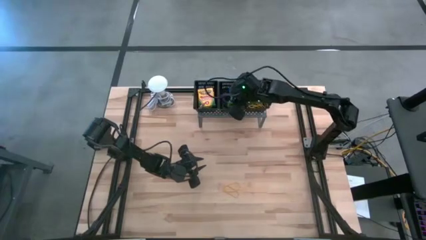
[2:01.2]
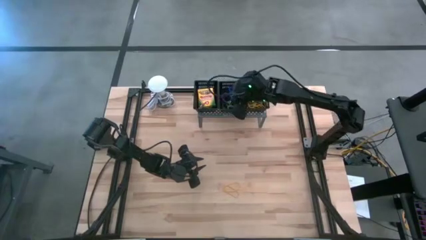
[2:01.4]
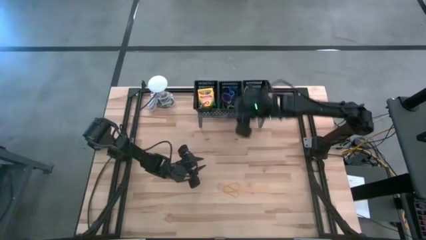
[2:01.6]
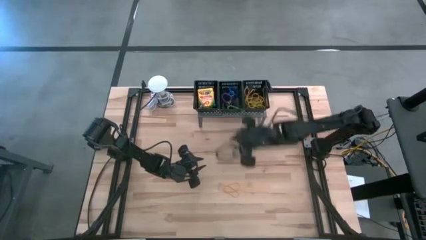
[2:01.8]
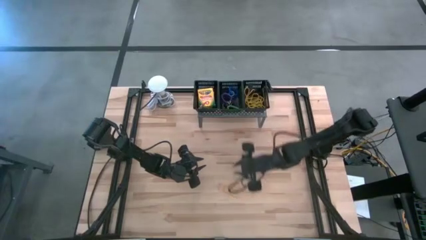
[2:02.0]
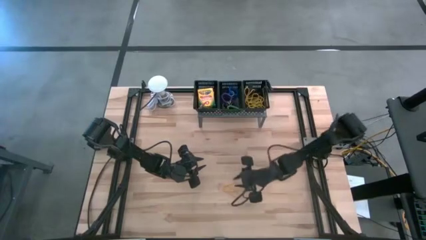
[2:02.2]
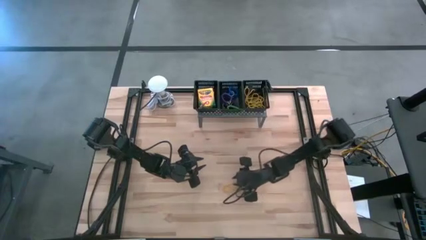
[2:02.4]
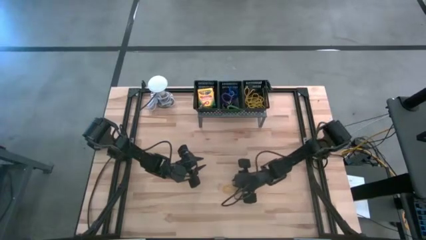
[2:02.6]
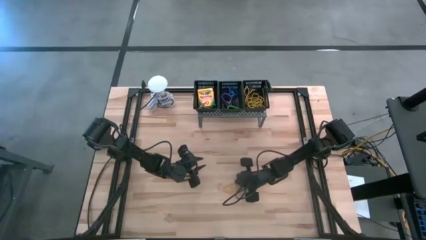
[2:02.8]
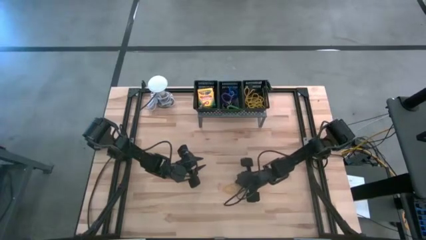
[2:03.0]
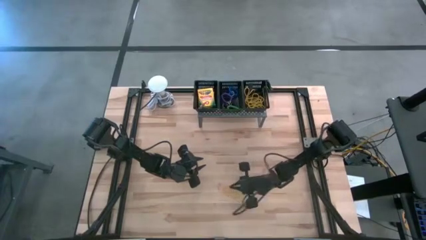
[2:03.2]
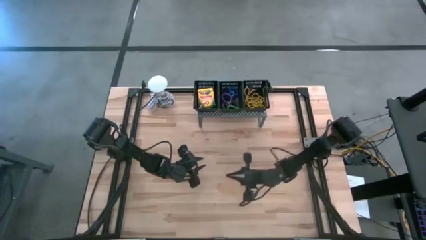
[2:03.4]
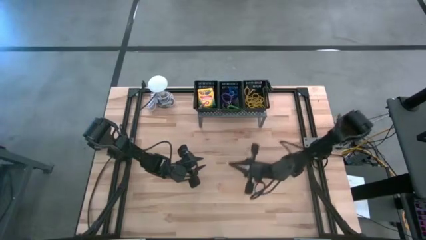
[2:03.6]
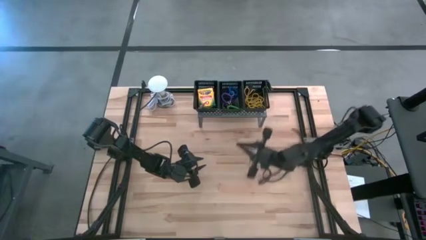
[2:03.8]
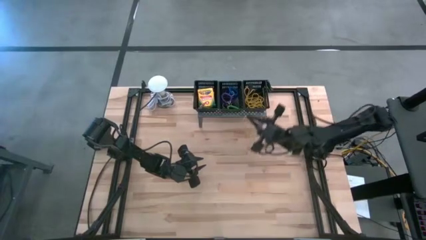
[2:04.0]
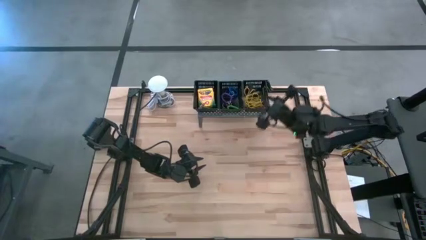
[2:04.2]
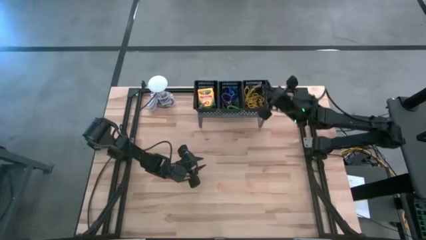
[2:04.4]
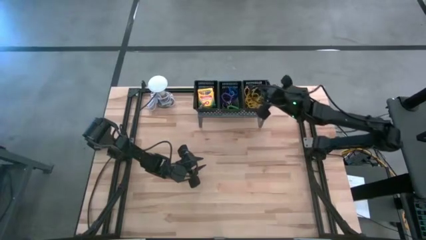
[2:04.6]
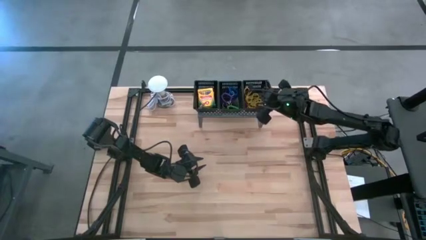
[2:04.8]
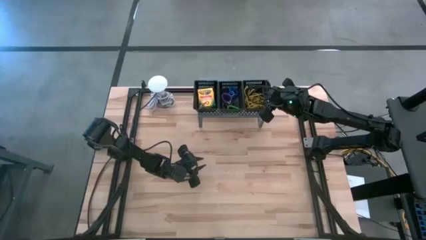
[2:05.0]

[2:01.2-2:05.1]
Task: Pick & Place Office Desk Supplies
Put the yellow rubber band into the right black bin on the shelf

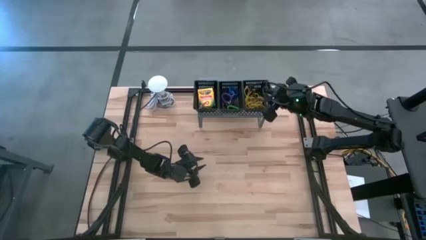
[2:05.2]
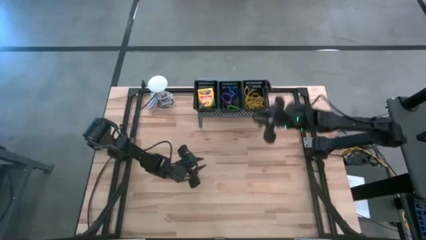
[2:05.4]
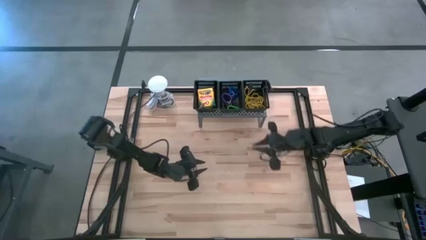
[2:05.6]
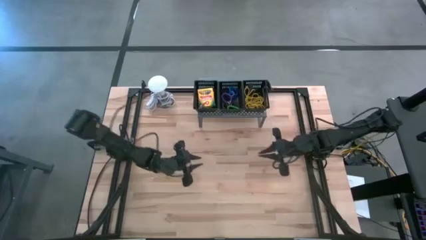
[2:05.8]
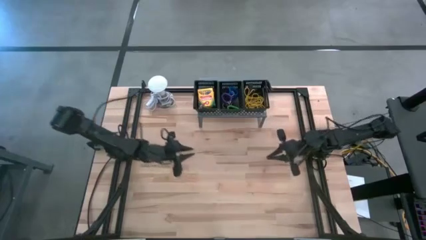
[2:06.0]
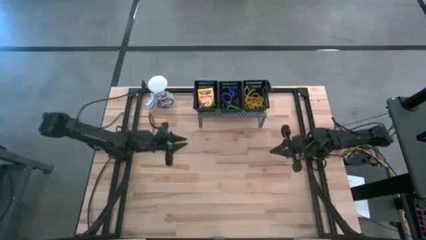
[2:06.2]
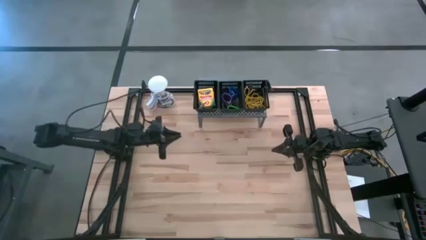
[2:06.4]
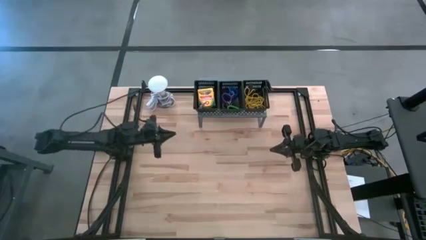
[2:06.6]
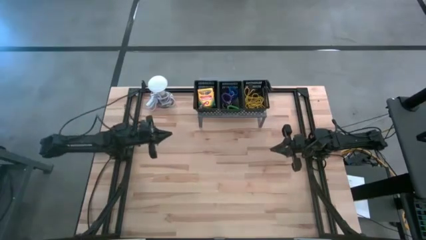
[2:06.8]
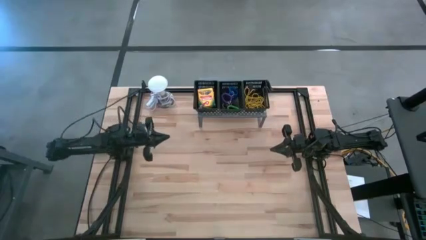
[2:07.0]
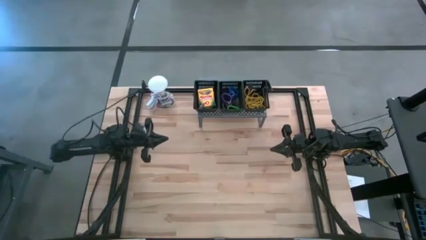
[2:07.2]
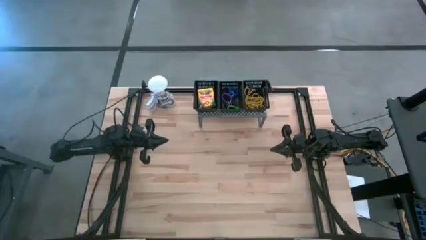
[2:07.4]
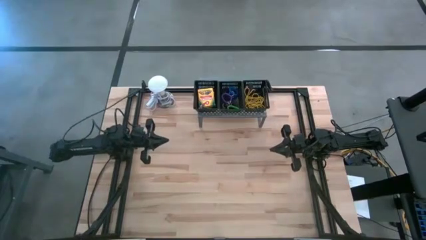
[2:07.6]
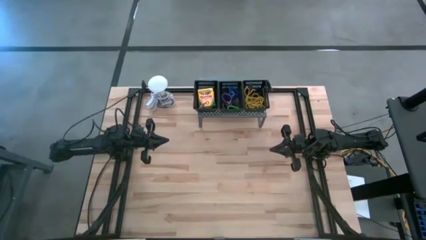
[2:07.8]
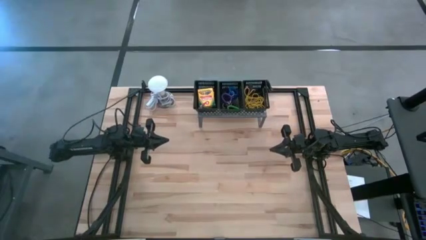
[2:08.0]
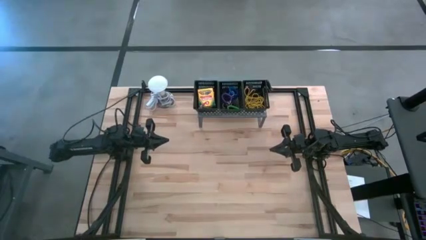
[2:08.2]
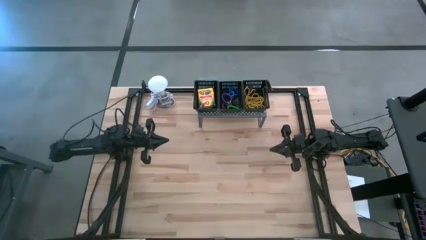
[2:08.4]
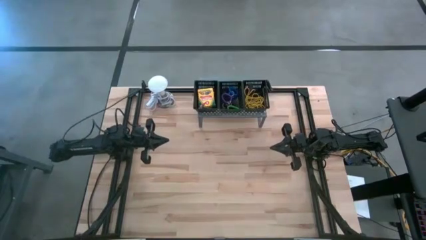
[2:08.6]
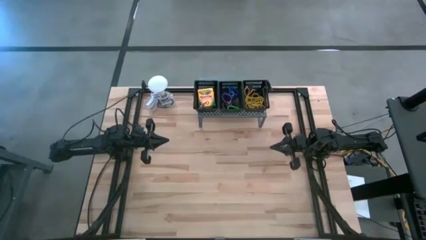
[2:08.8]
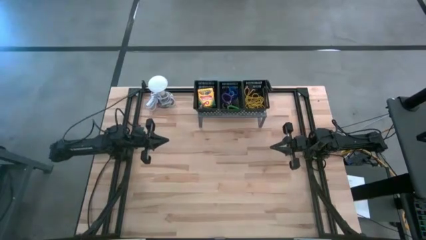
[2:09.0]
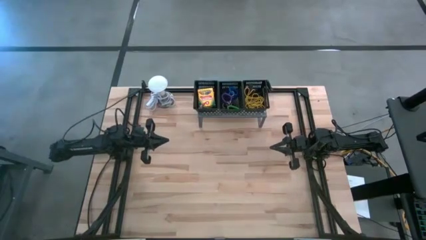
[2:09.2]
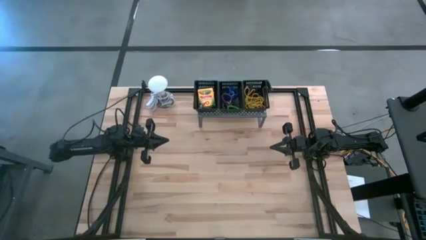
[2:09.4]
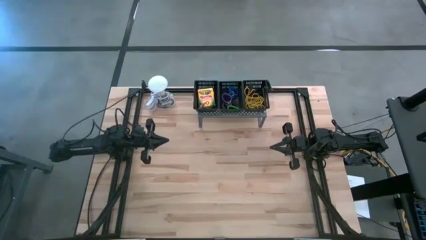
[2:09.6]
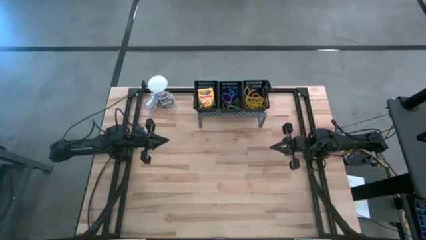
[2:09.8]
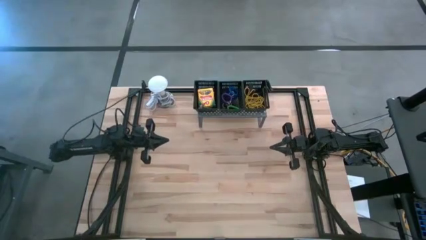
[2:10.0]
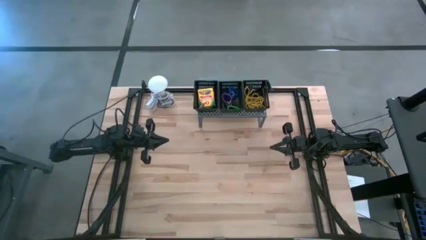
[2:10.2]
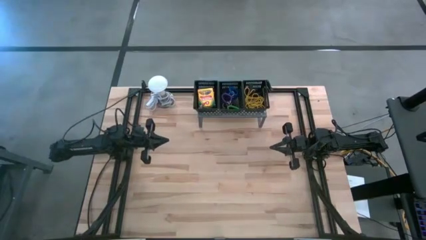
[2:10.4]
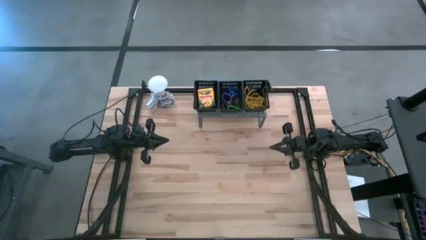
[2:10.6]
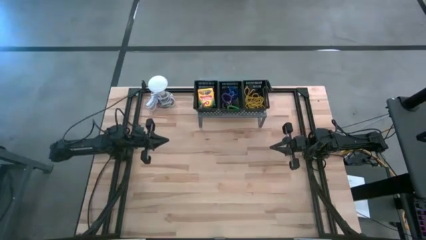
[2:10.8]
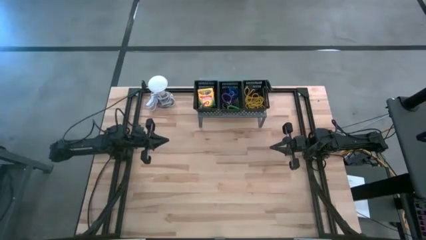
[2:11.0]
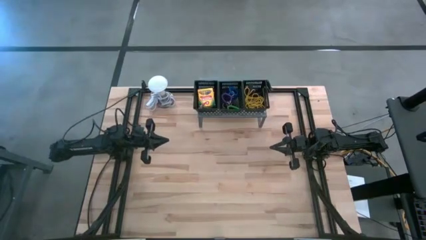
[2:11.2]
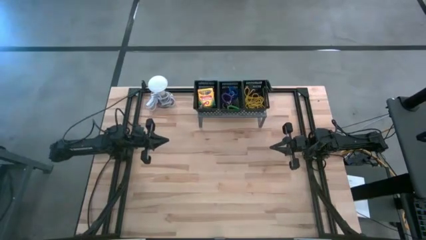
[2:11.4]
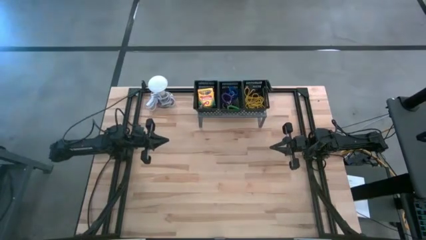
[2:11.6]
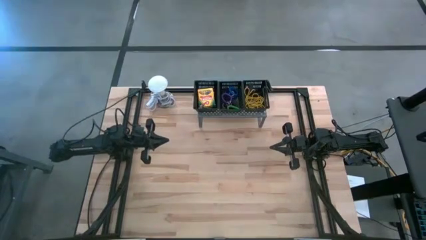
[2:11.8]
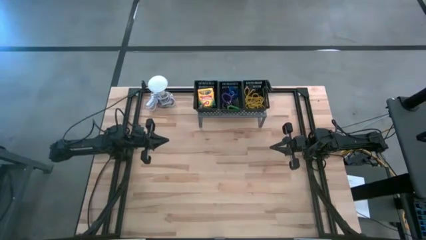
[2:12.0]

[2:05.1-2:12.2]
Return to Home Position

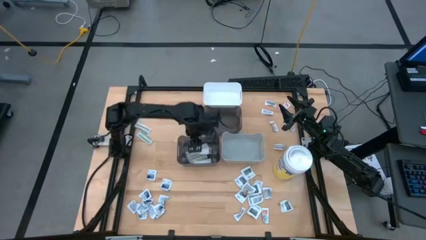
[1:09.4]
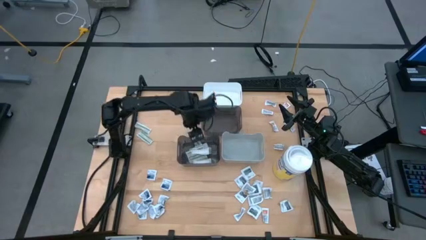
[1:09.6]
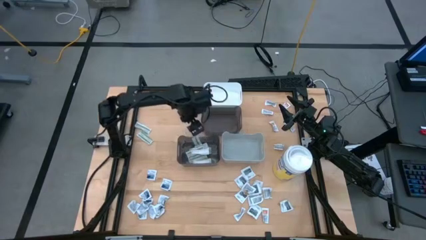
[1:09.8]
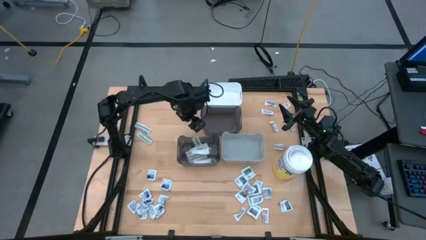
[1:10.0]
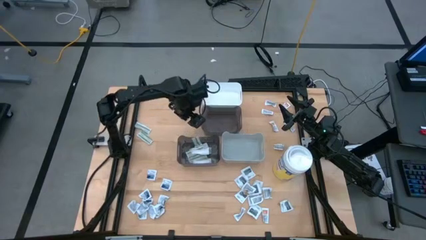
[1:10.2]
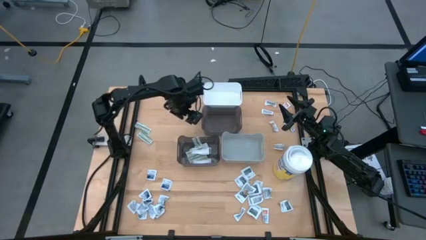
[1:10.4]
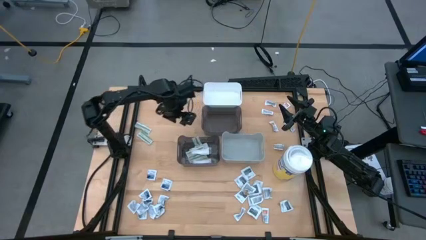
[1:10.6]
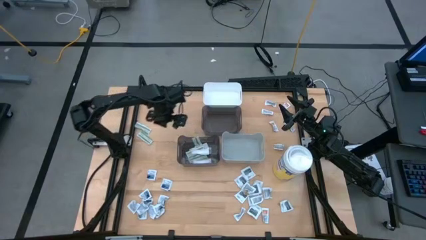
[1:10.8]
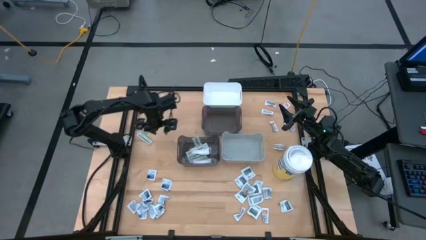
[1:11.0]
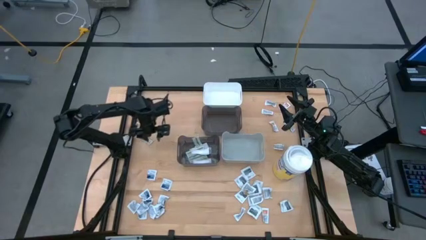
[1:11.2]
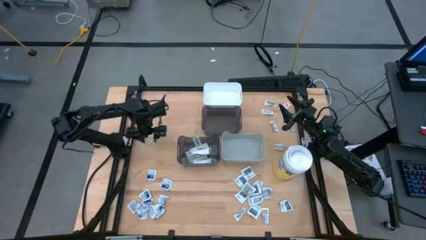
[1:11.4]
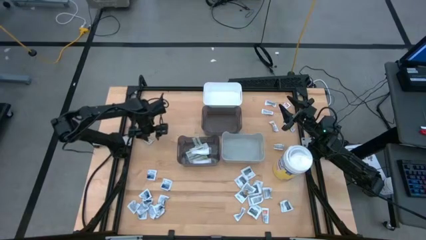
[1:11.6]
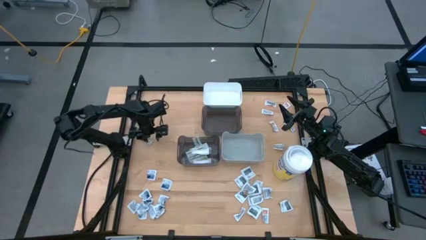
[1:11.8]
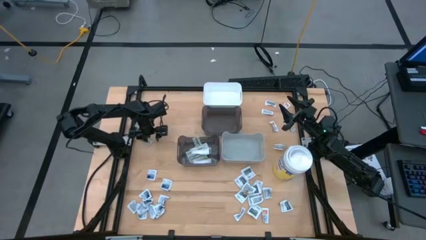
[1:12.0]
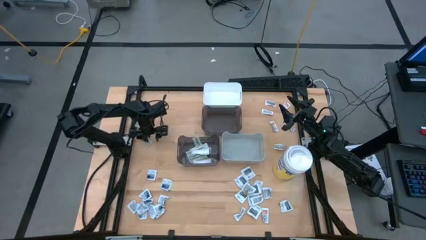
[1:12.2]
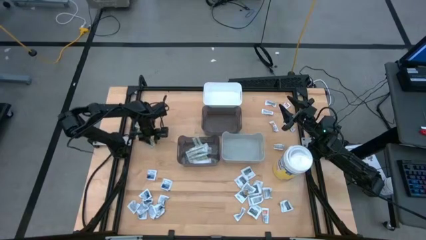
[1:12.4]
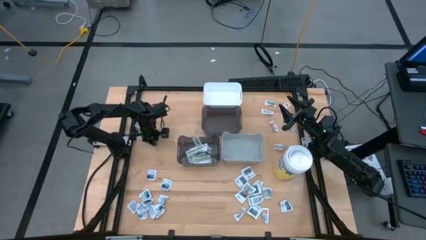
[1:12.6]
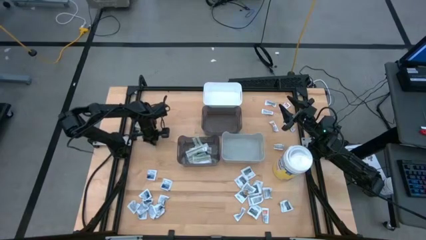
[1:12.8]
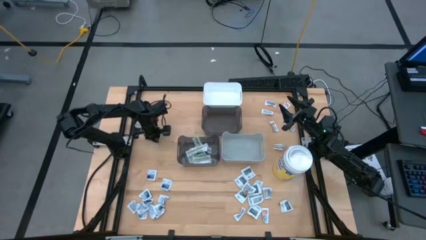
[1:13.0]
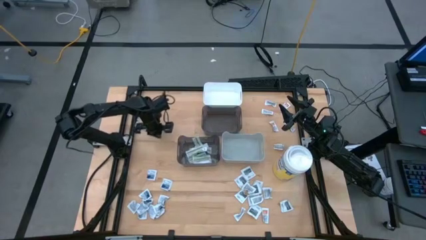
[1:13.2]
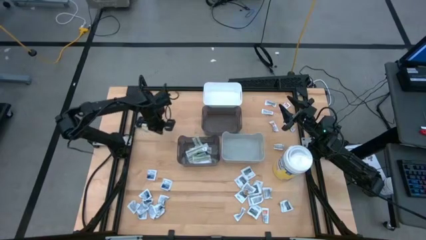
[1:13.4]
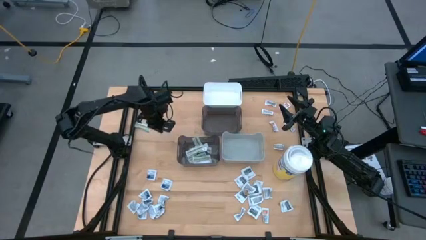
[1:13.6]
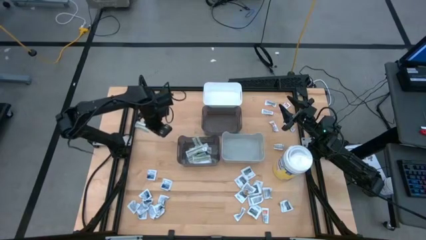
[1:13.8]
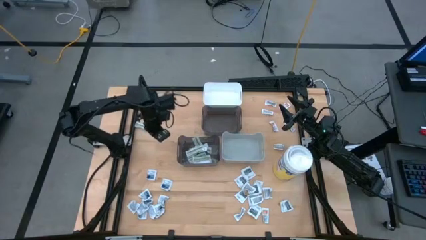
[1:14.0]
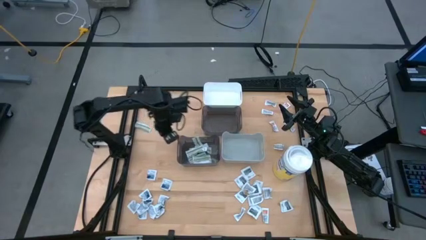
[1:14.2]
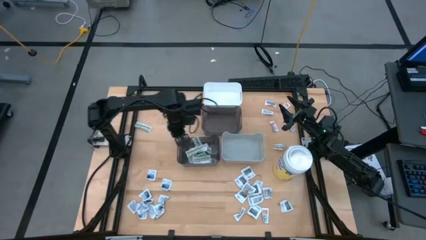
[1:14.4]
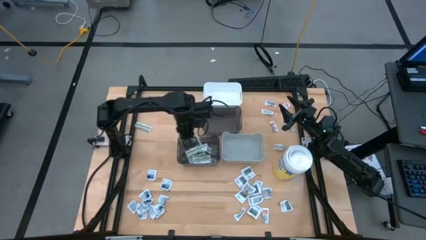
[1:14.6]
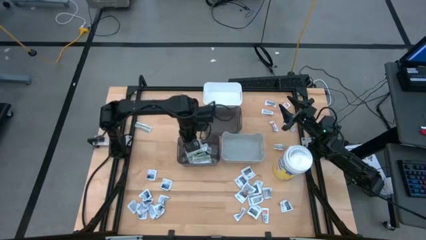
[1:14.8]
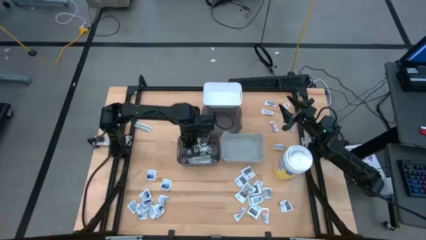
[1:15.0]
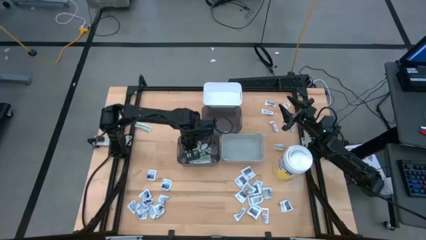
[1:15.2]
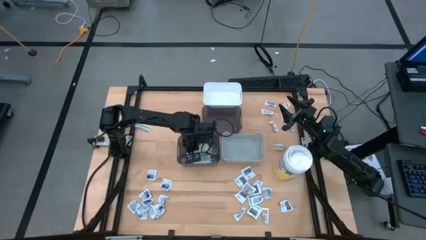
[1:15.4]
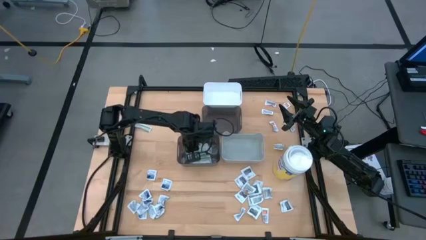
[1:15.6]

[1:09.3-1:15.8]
Task: Pick & Place First Aid Supplies
Put the white bandage into the bottom black bin
